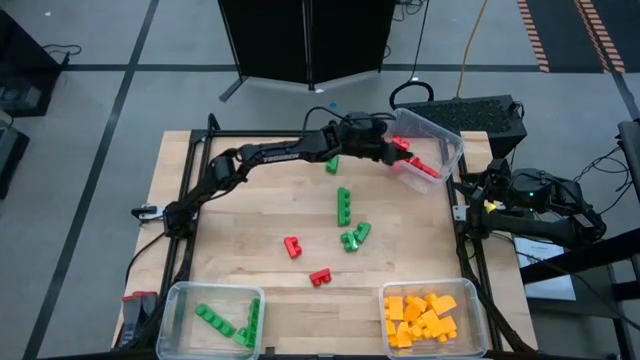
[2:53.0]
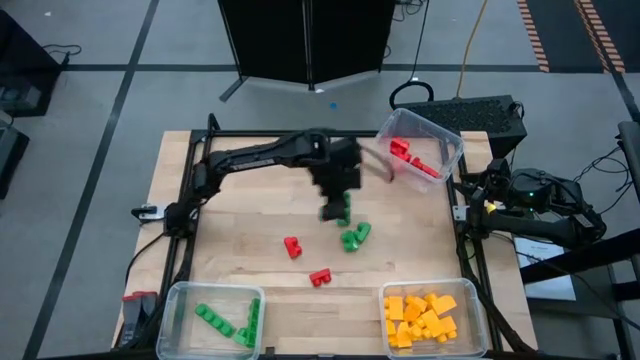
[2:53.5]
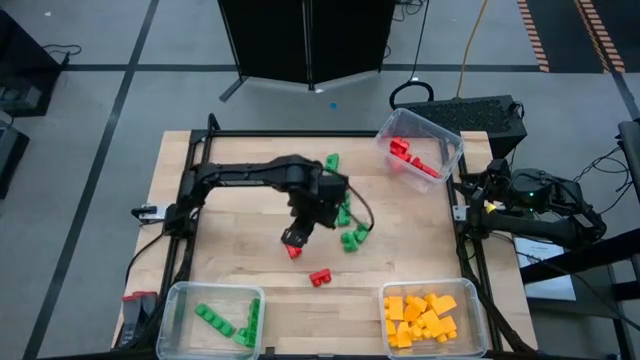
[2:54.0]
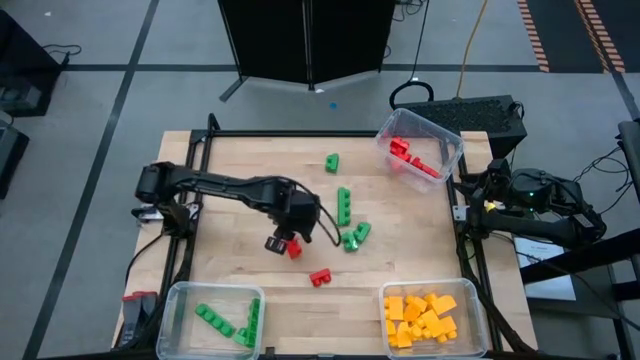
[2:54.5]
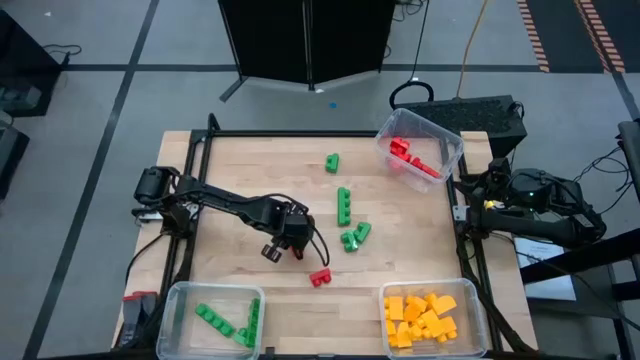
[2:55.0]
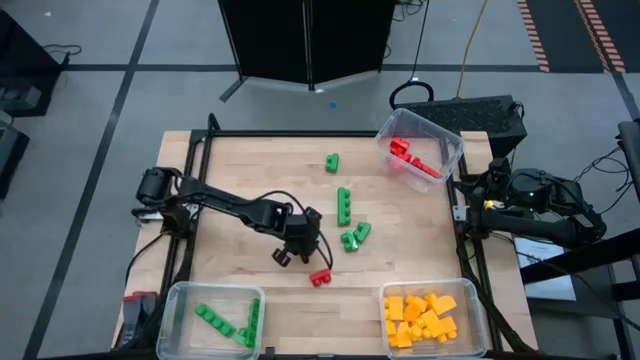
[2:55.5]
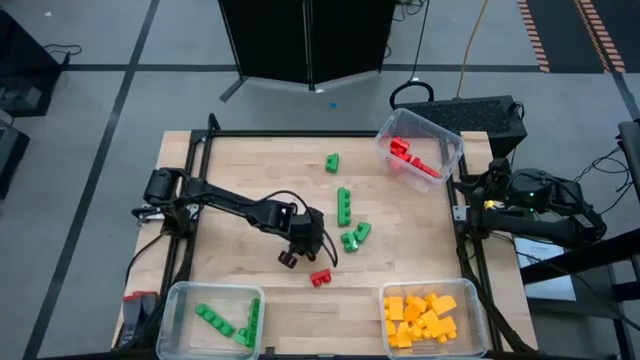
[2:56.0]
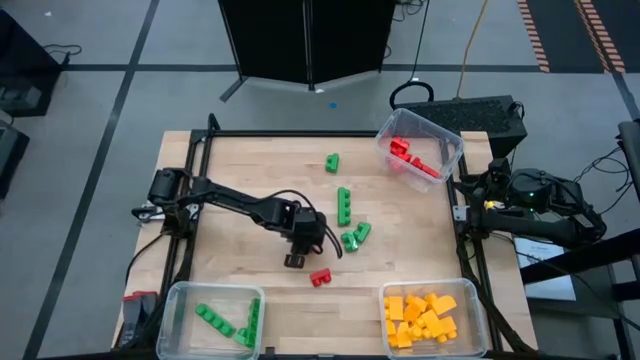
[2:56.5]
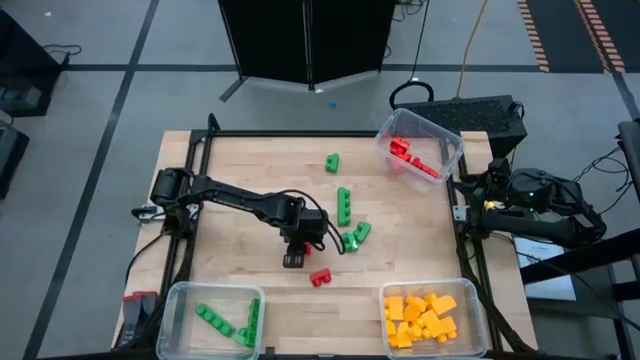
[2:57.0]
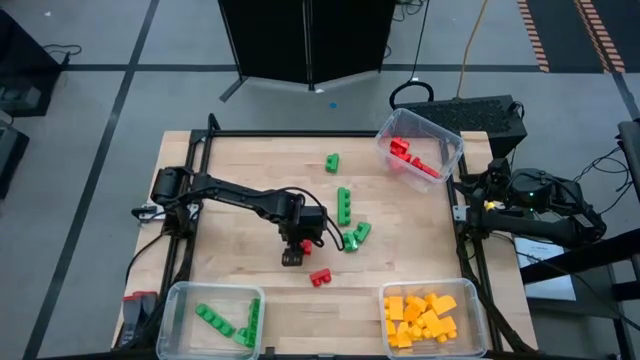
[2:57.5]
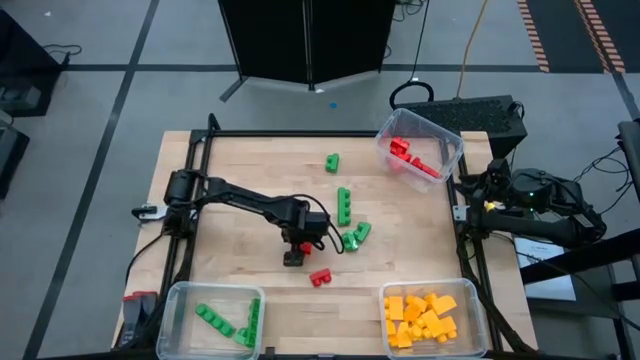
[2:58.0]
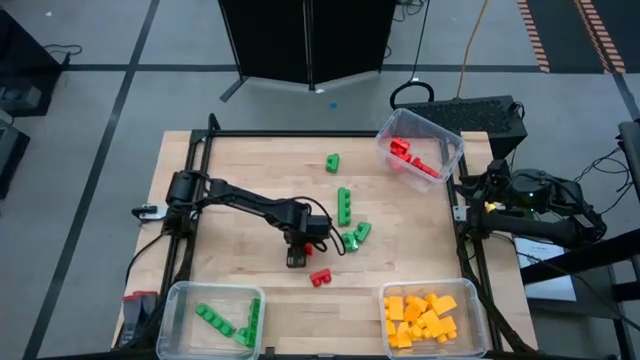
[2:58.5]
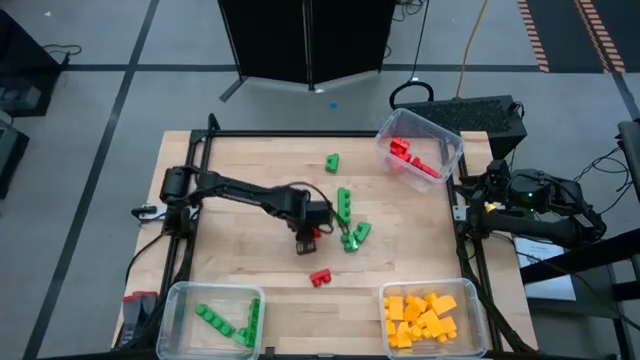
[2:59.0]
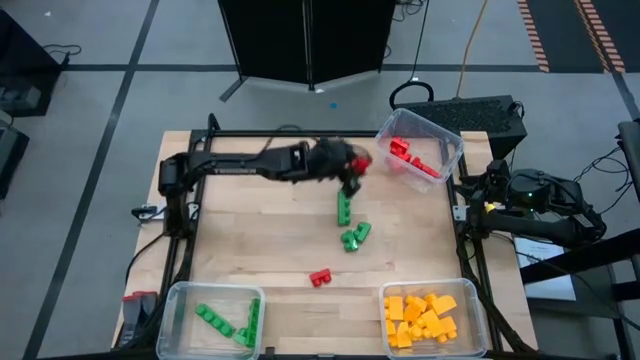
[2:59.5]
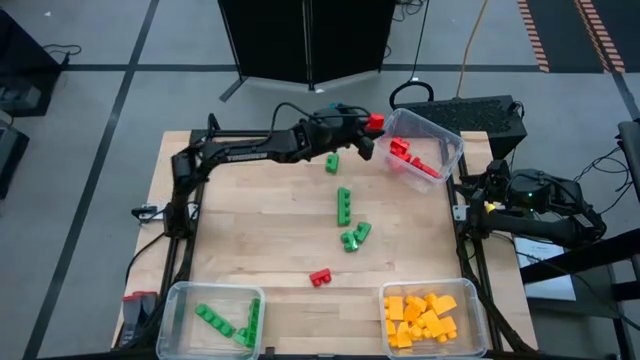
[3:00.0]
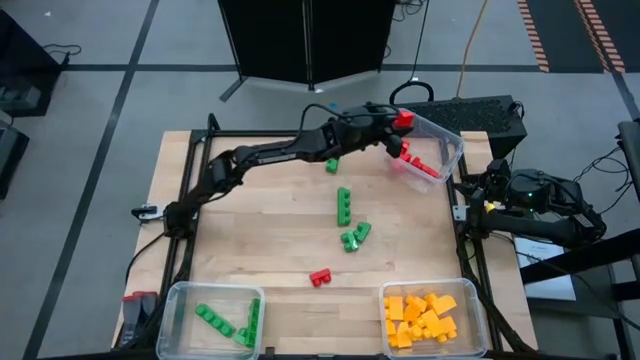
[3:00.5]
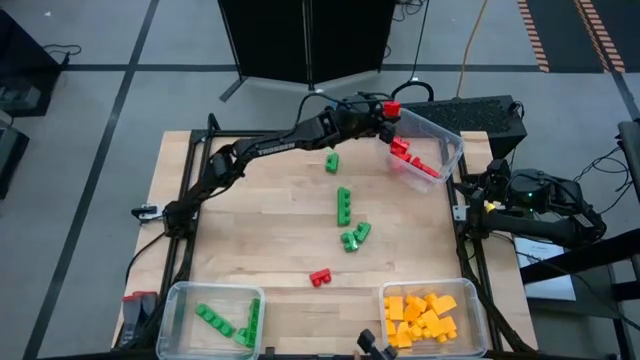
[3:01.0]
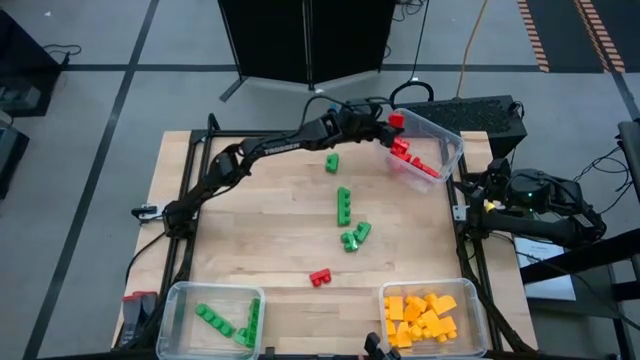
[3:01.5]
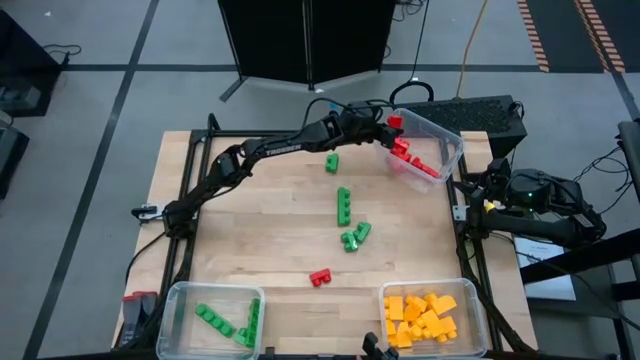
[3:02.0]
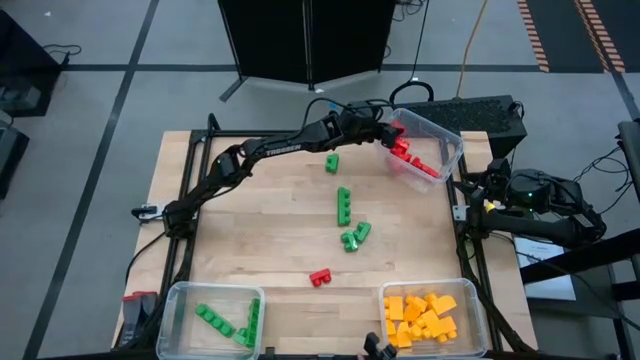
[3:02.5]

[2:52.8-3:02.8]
Task: Sort blocks
Put the red game piece into the top transparent bin

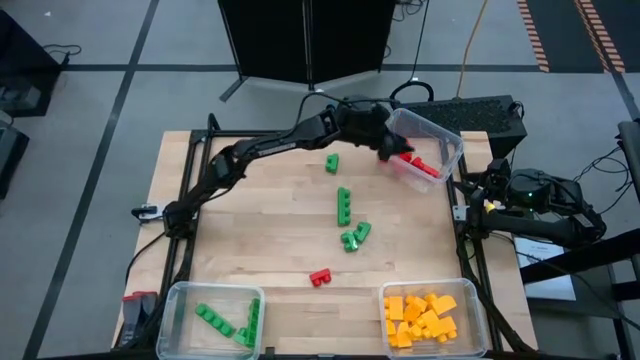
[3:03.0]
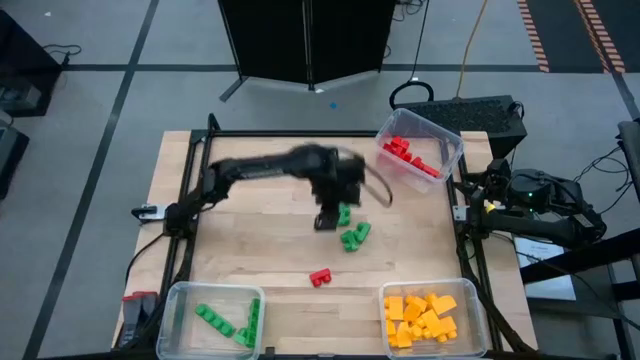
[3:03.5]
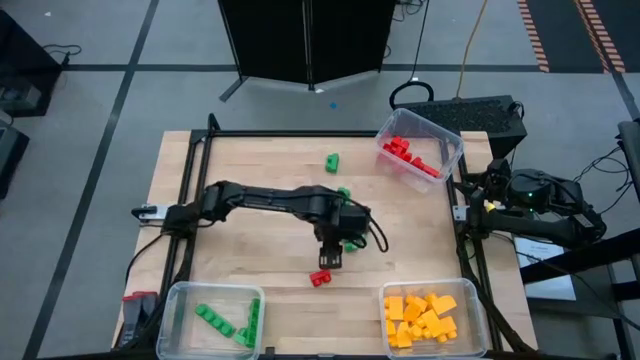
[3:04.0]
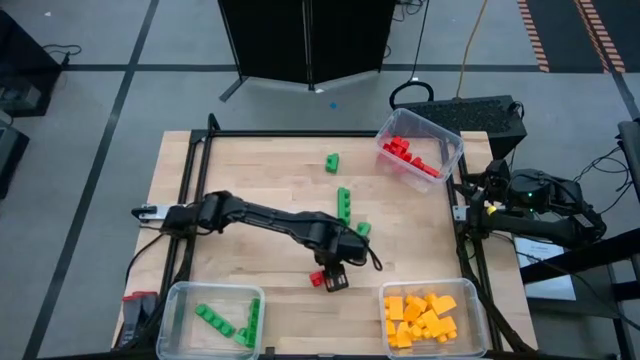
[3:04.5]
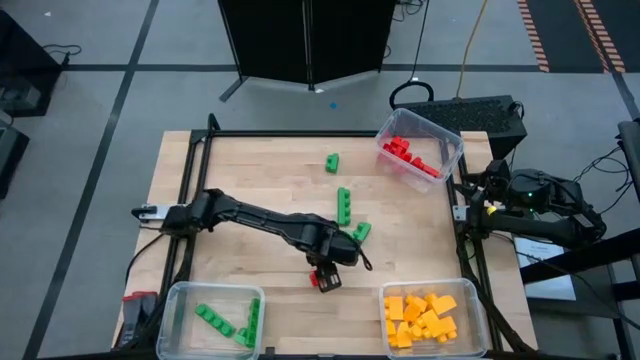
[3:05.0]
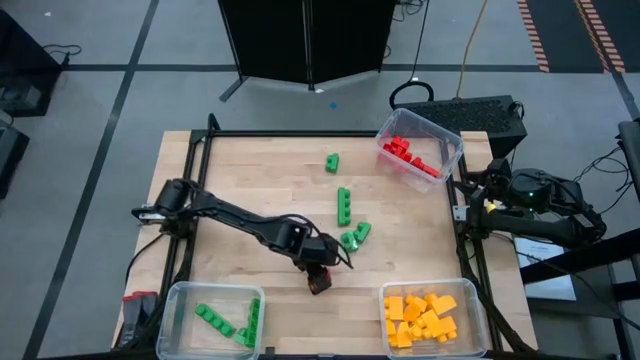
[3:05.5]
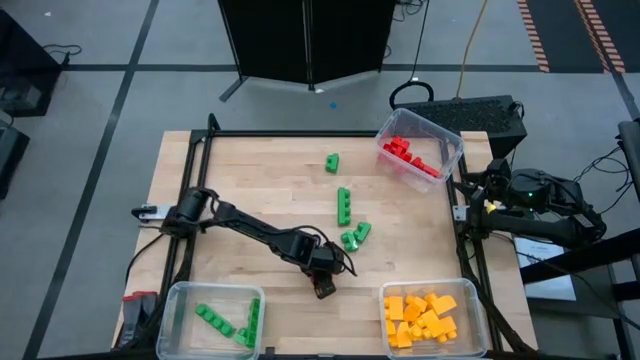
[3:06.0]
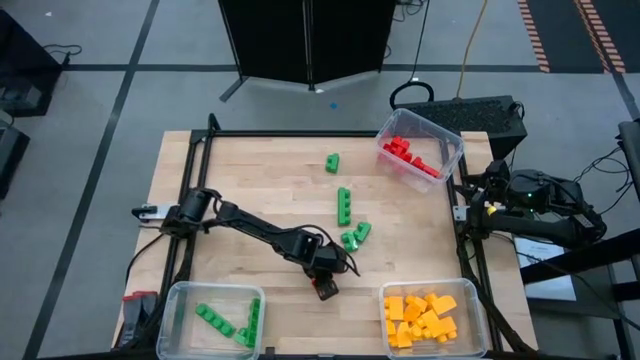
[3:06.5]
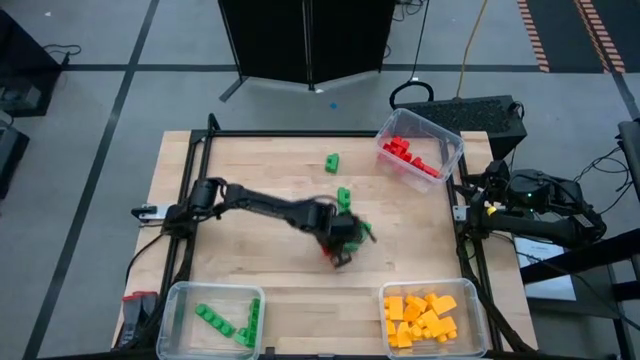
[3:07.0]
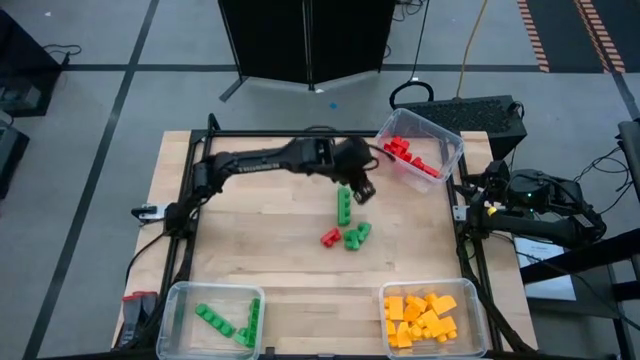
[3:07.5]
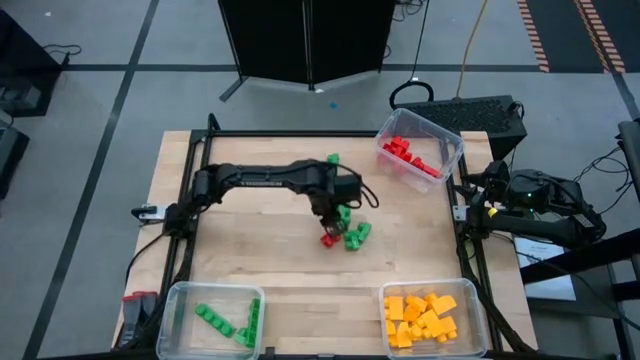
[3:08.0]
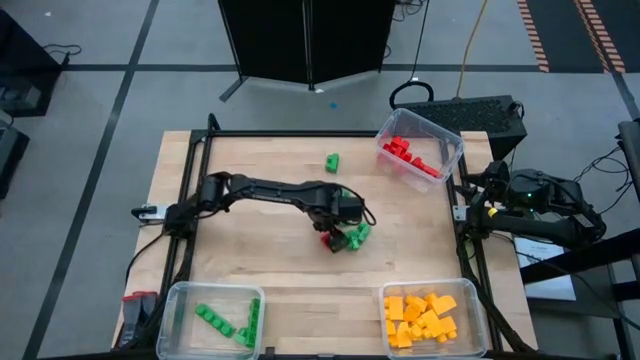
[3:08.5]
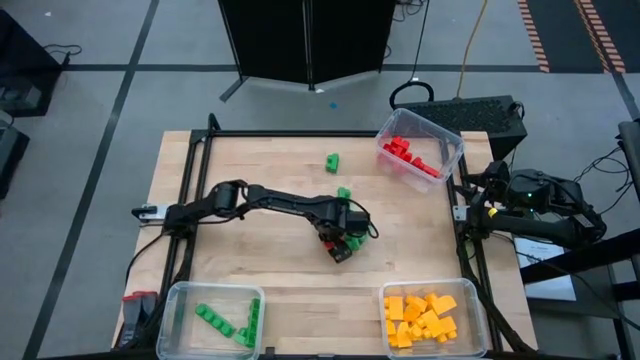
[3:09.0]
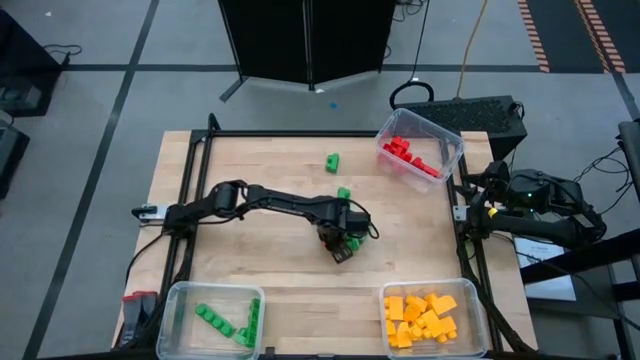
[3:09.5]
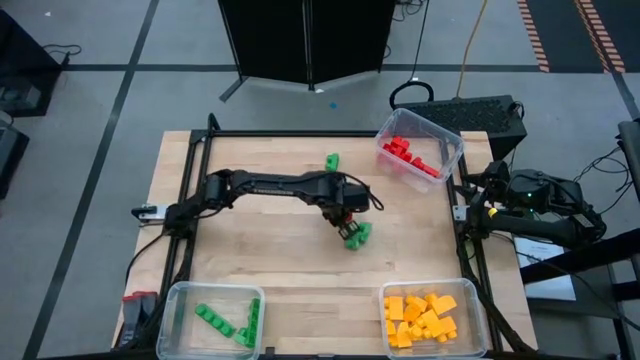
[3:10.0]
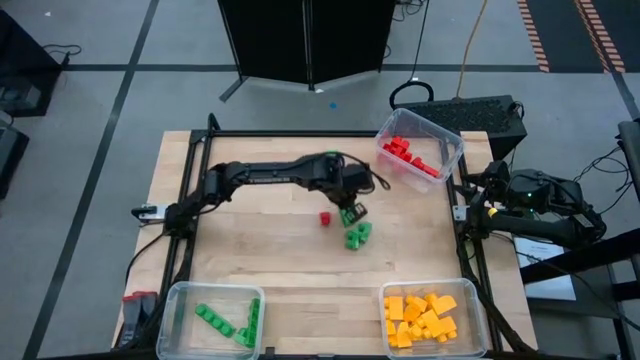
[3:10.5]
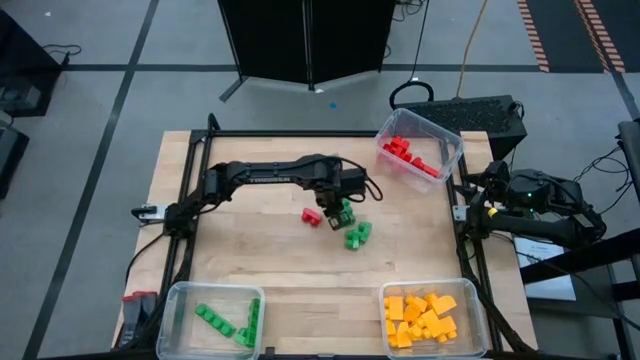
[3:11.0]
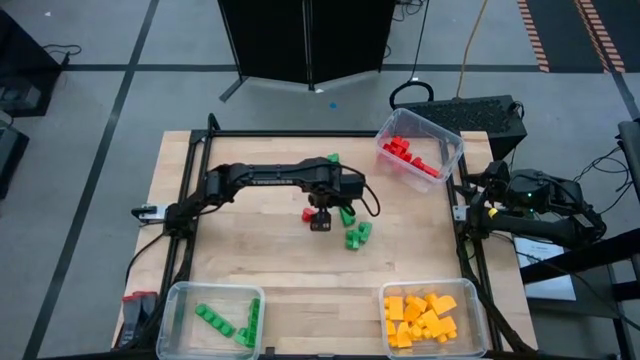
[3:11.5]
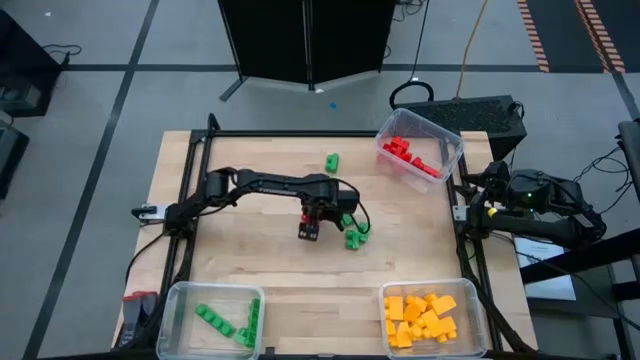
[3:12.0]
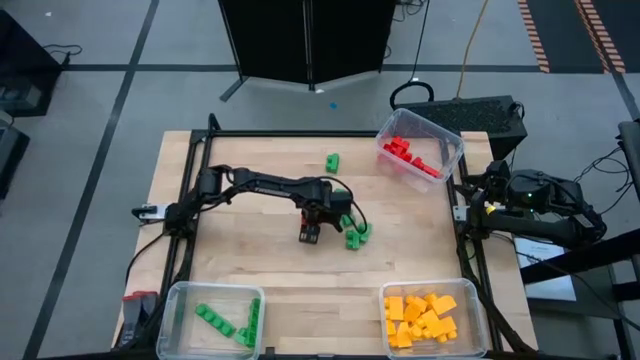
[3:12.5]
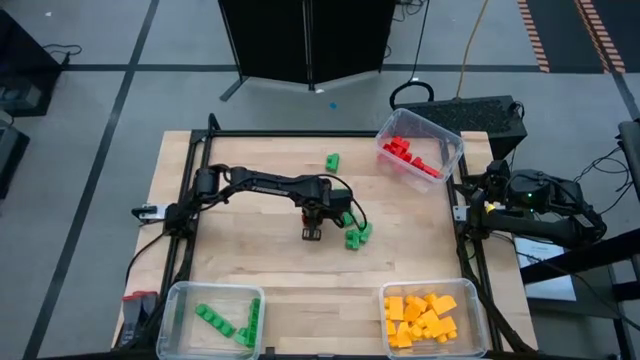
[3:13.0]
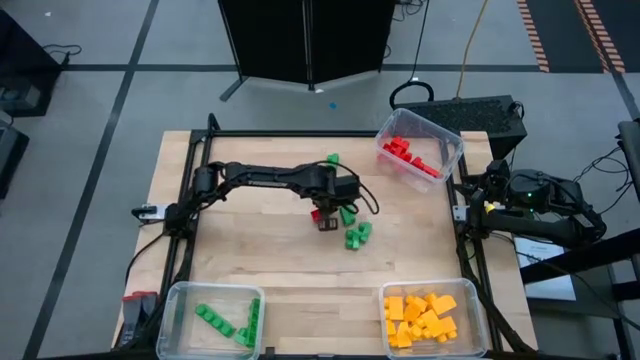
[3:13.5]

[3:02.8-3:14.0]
Put the red game piece into the top transparent bin
